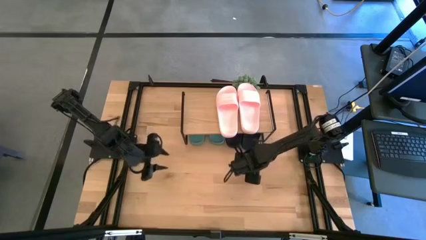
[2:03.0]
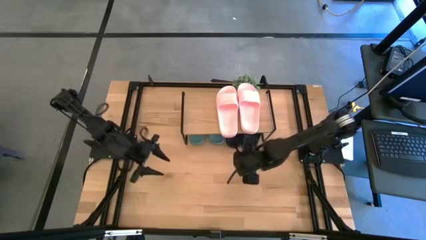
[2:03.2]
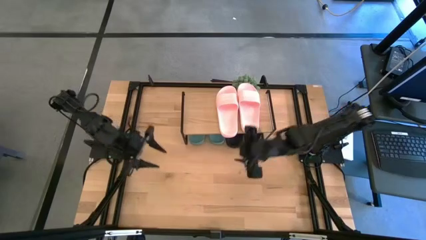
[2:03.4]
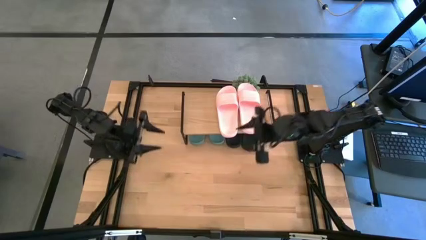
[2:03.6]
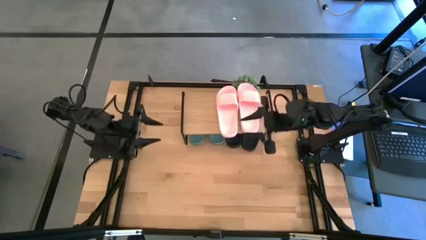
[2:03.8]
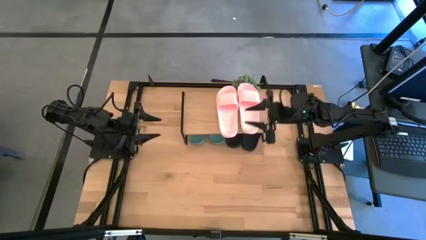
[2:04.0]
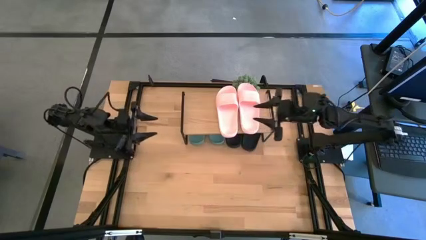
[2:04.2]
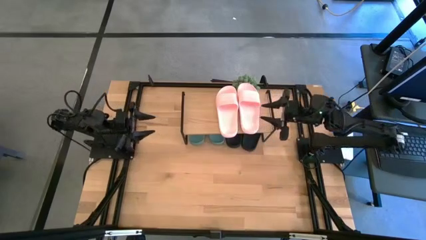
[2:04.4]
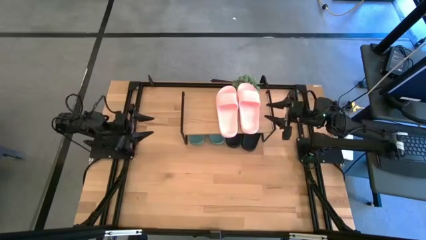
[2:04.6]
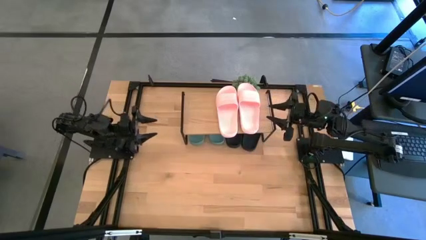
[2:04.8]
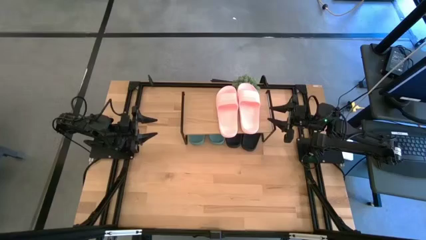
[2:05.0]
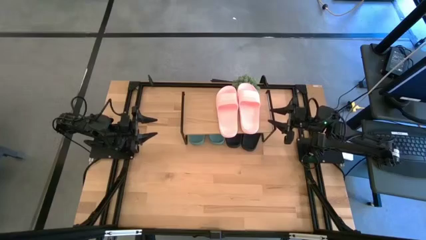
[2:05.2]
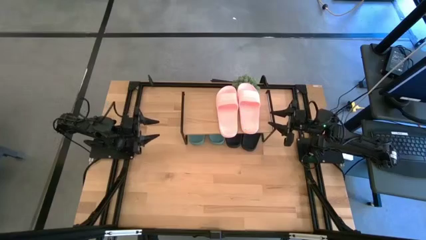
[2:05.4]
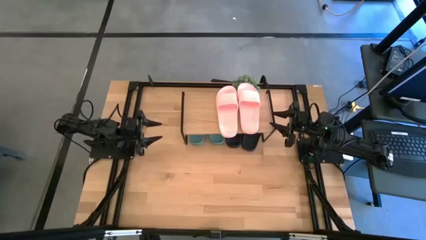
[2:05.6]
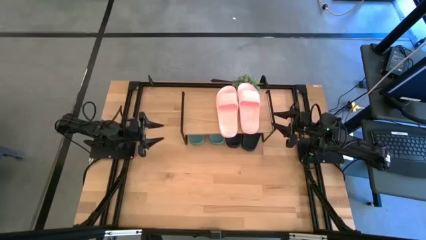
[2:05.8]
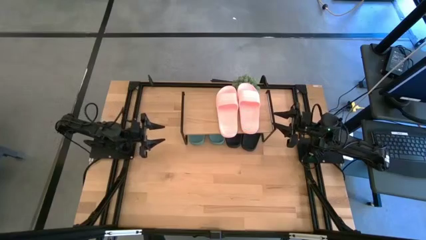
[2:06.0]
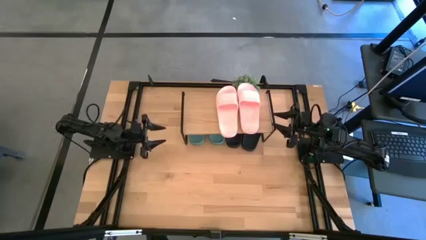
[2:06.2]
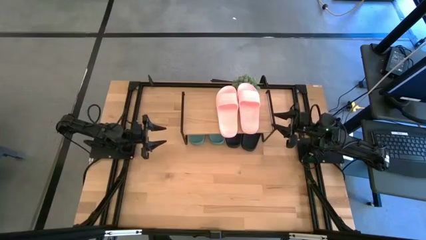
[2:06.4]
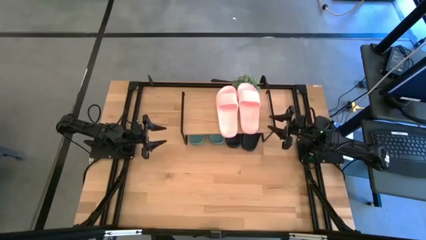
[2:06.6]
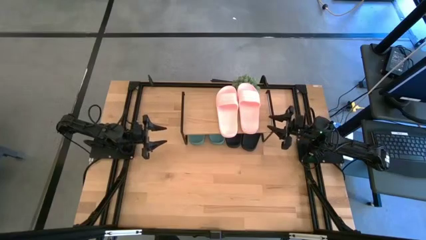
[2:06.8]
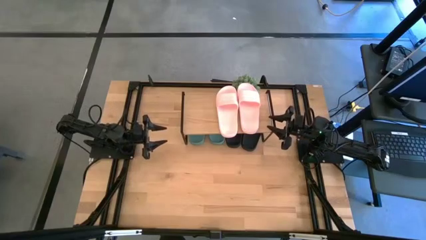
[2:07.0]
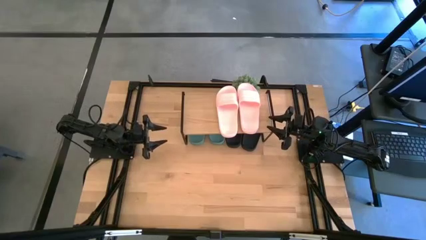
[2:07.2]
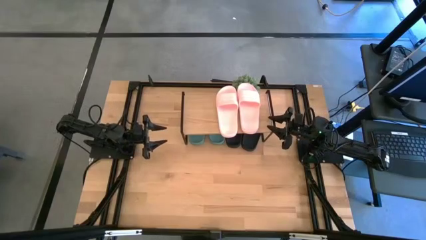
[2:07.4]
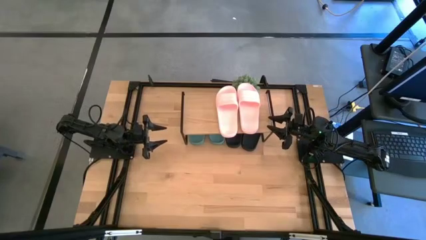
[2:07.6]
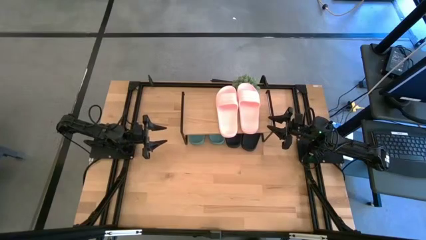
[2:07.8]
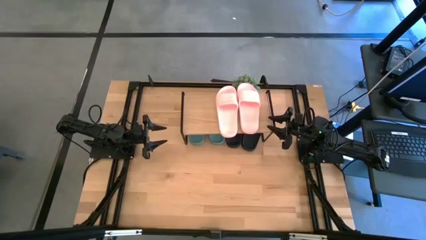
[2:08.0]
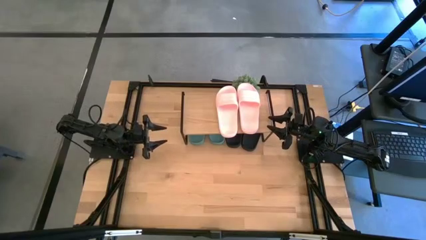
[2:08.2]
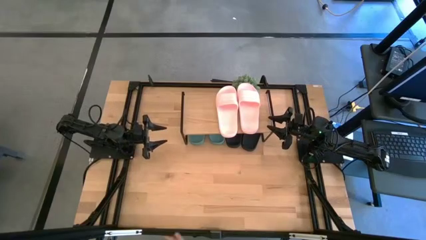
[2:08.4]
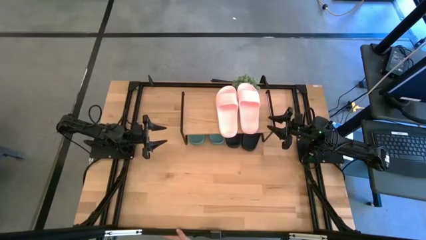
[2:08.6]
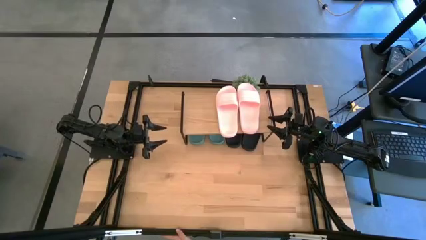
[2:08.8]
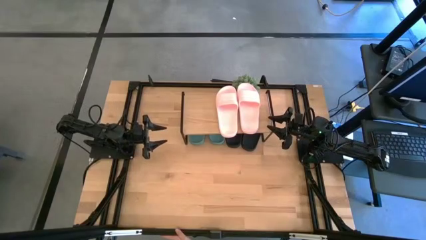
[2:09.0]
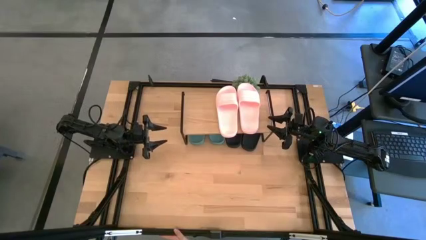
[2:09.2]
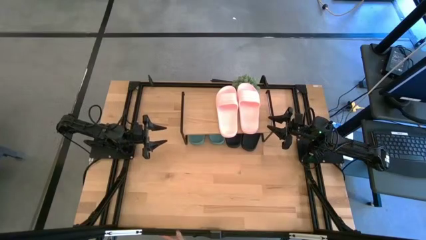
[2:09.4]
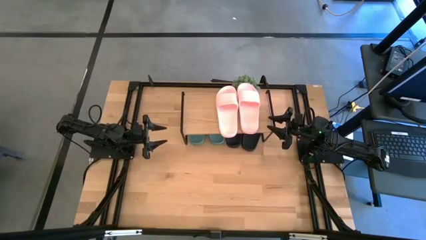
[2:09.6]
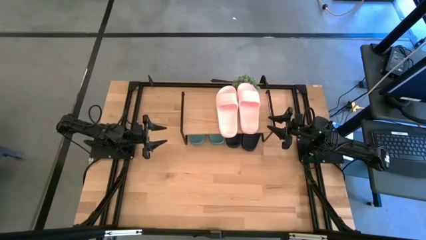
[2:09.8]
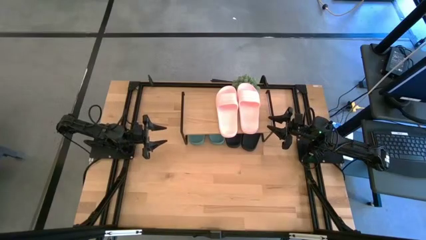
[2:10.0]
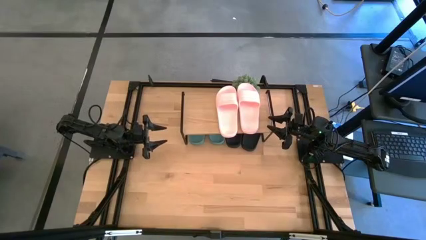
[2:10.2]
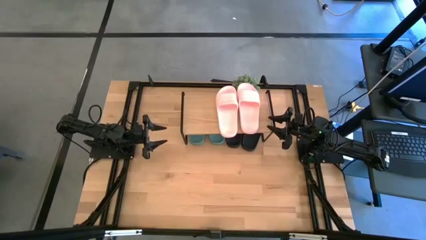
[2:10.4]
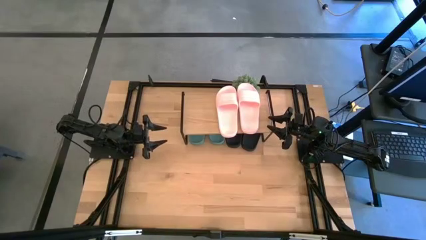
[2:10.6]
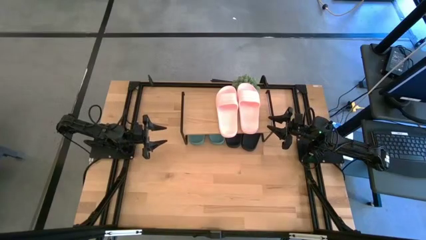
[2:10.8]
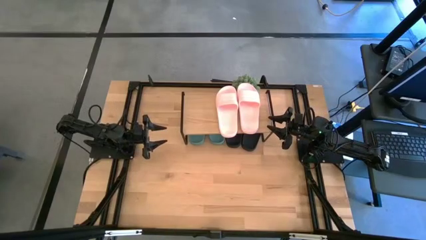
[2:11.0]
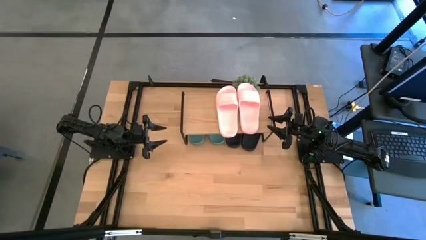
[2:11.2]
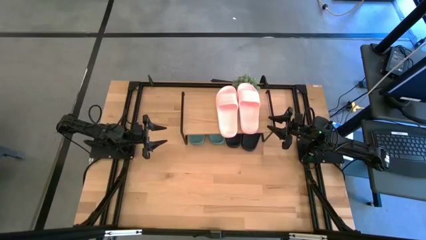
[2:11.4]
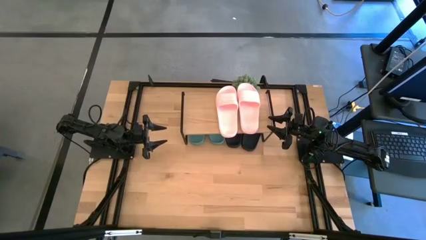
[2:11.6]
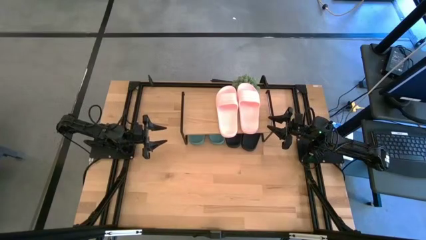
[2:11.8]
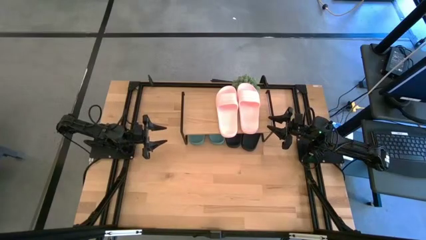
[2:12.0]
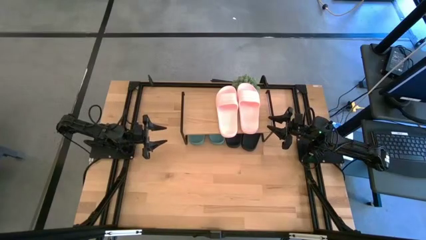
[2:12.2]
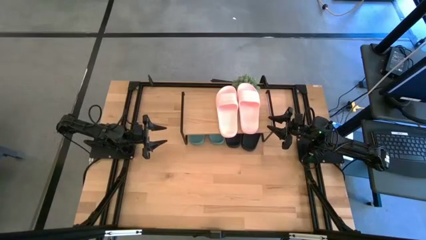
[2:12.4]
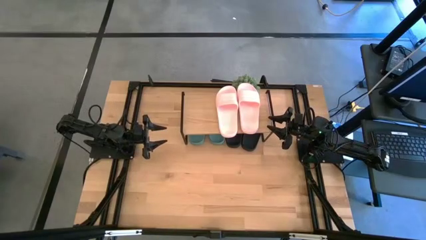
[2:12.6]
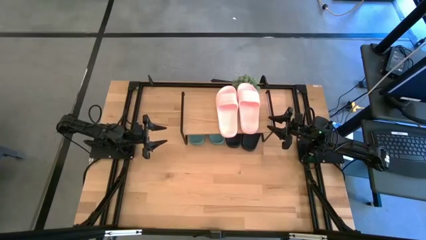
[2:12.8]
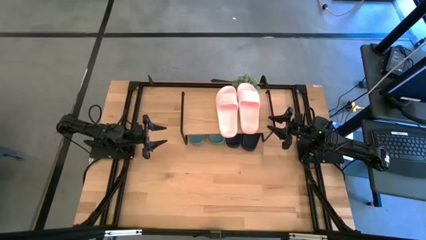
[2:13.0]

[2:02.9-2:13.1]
Task: Pick and place slides into the shelf
Return to Home Position
